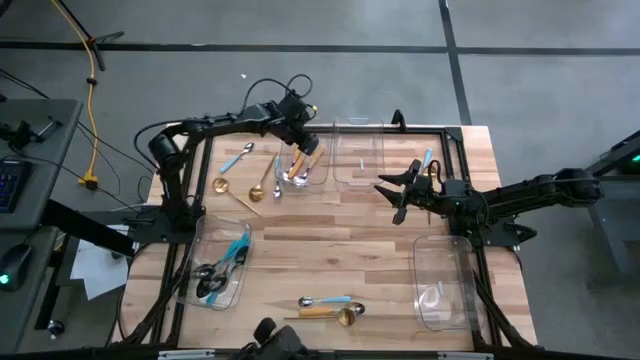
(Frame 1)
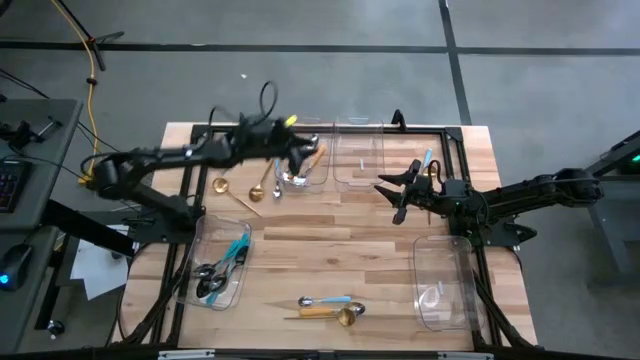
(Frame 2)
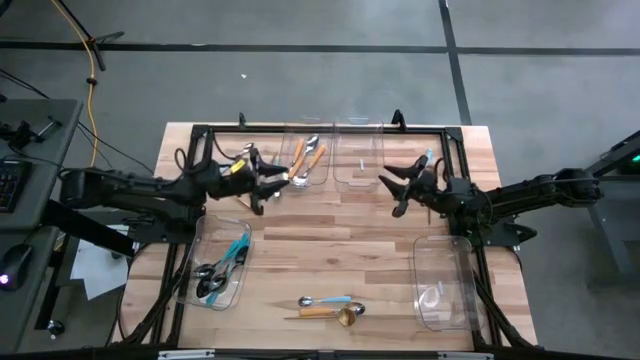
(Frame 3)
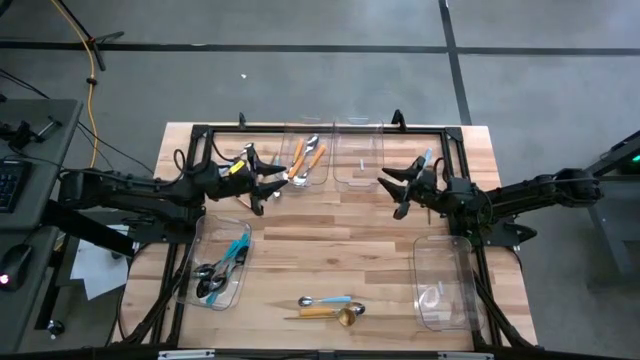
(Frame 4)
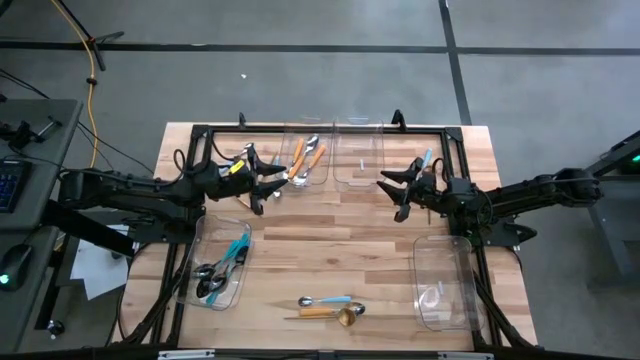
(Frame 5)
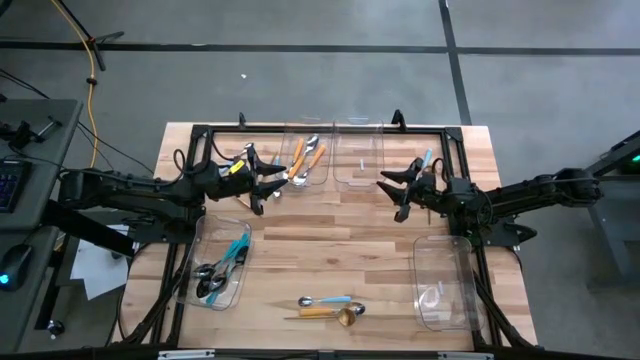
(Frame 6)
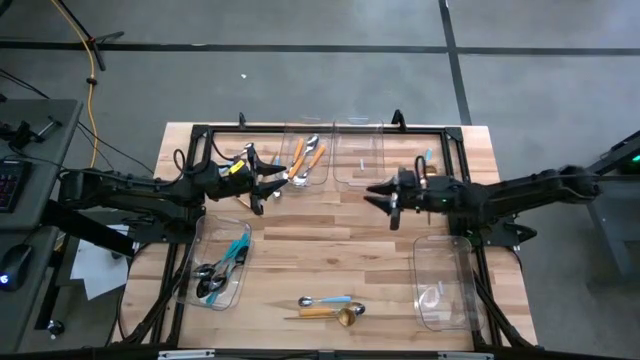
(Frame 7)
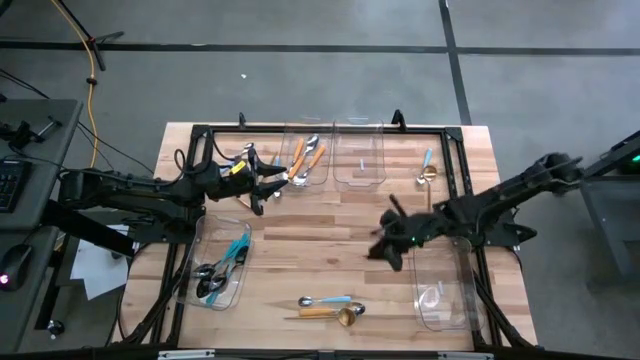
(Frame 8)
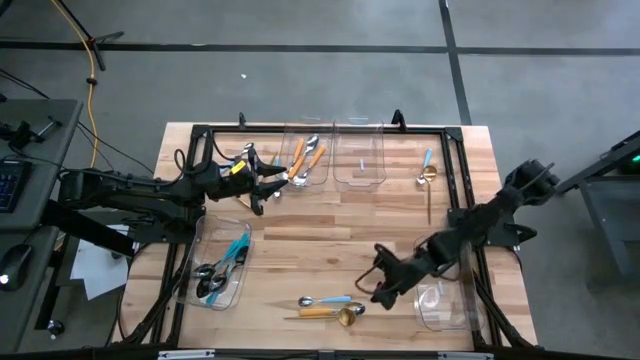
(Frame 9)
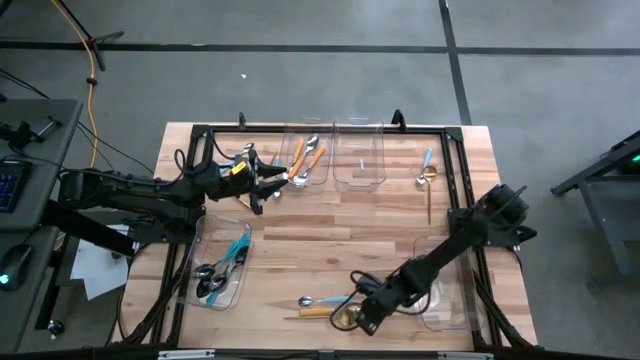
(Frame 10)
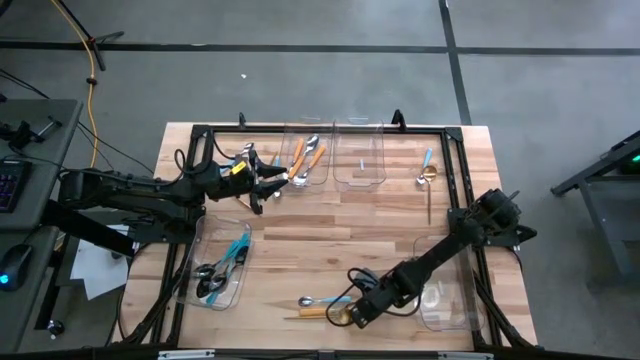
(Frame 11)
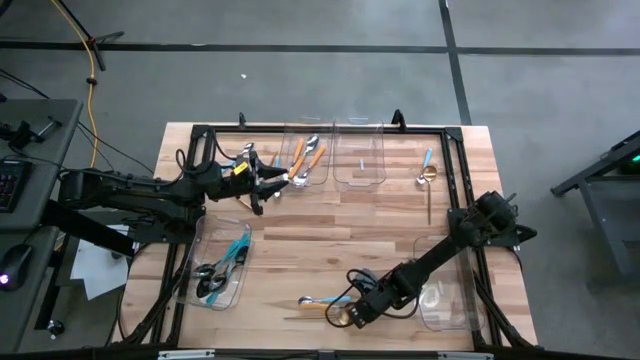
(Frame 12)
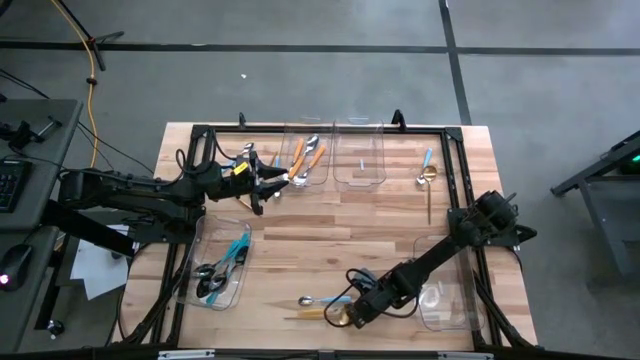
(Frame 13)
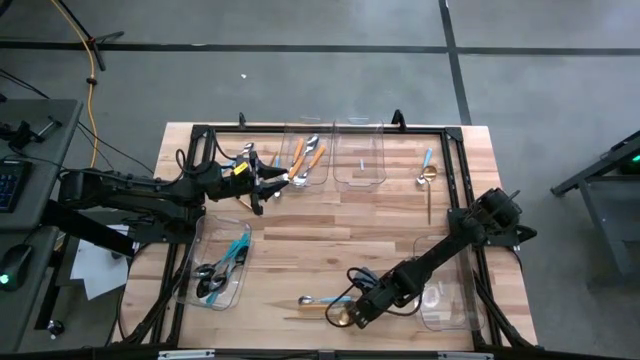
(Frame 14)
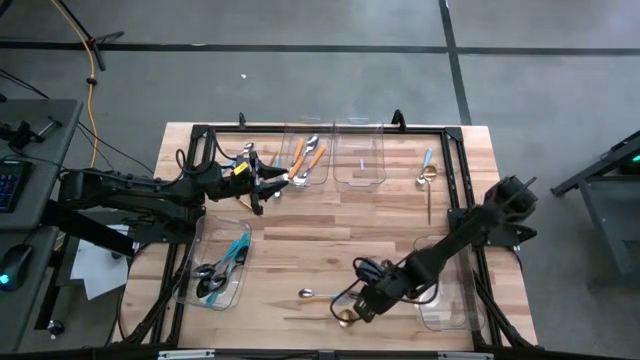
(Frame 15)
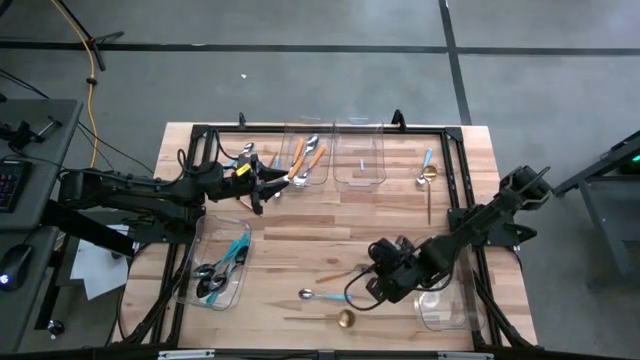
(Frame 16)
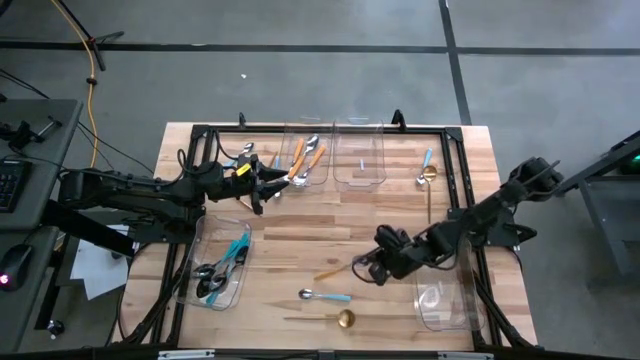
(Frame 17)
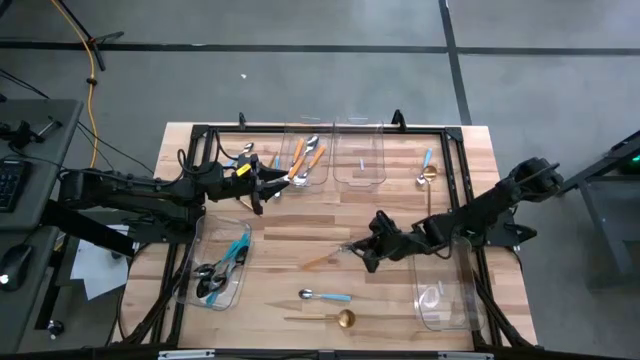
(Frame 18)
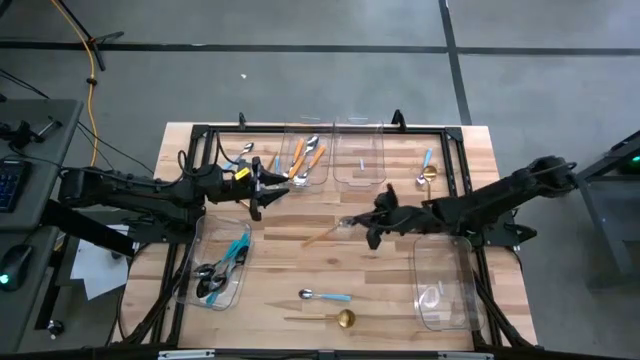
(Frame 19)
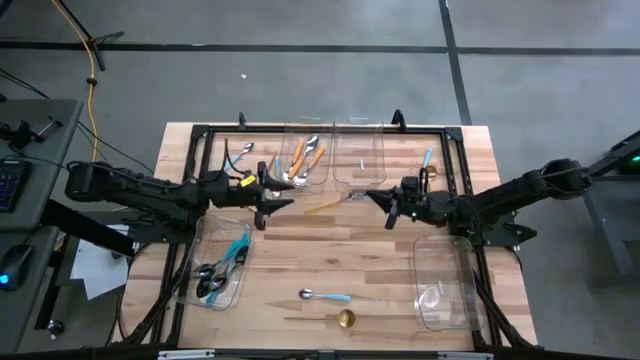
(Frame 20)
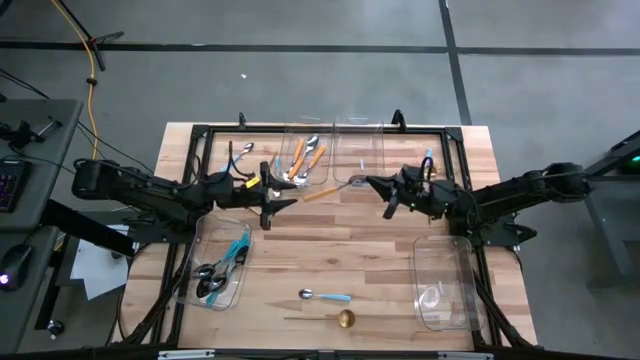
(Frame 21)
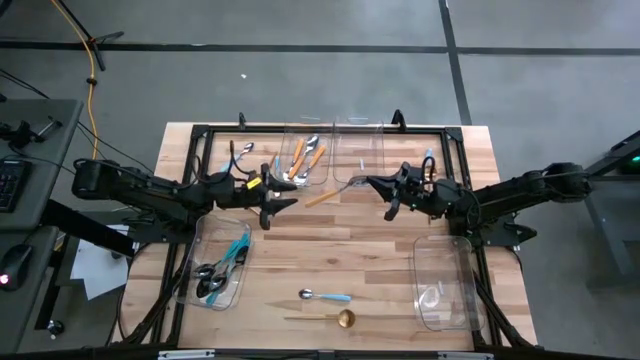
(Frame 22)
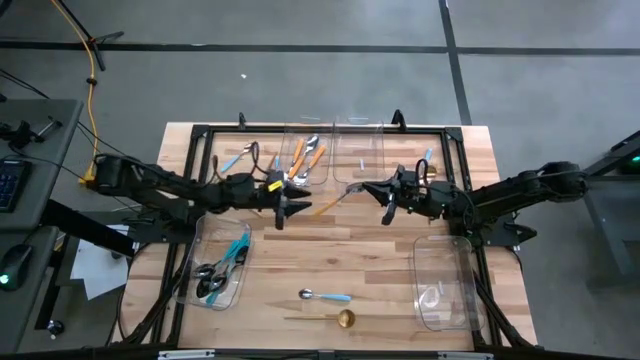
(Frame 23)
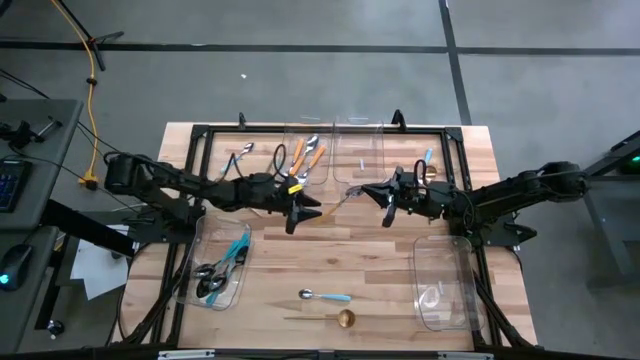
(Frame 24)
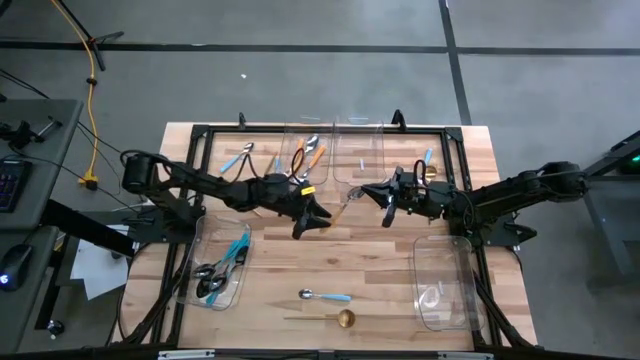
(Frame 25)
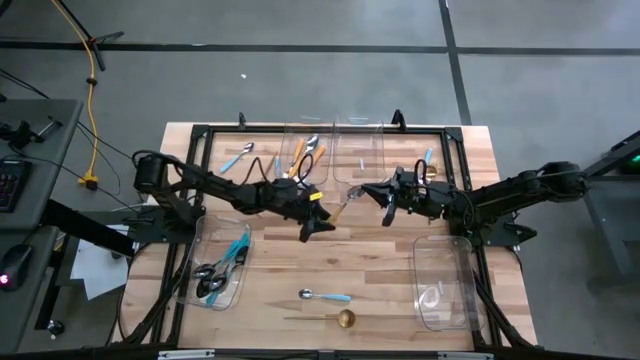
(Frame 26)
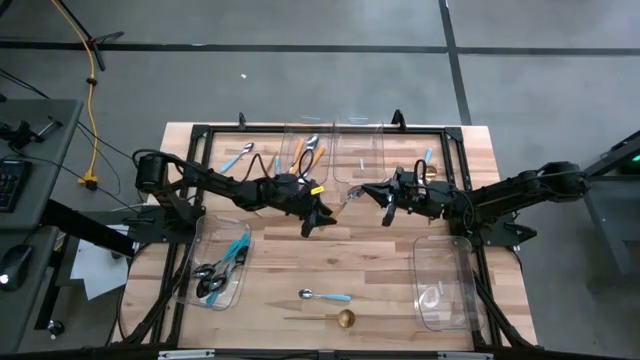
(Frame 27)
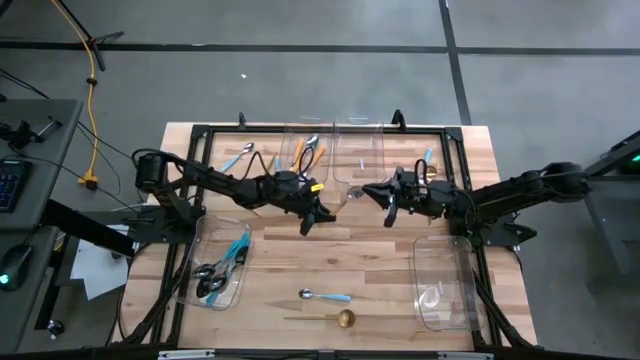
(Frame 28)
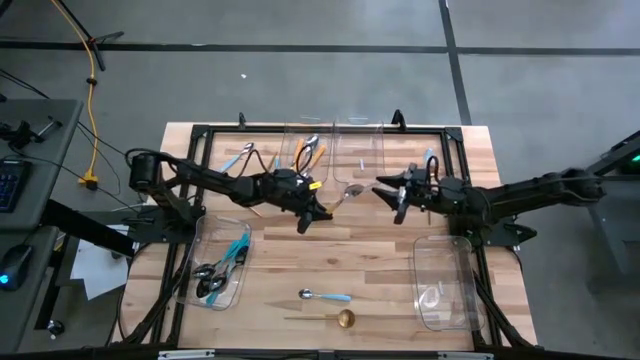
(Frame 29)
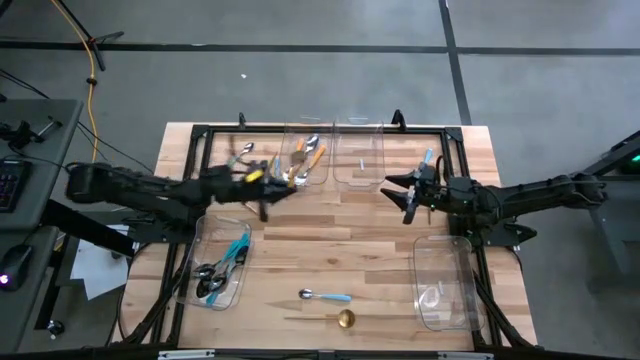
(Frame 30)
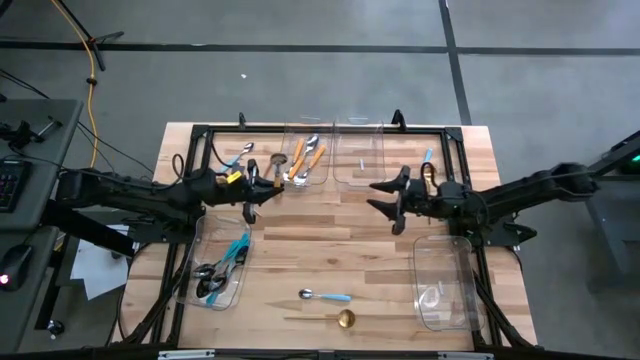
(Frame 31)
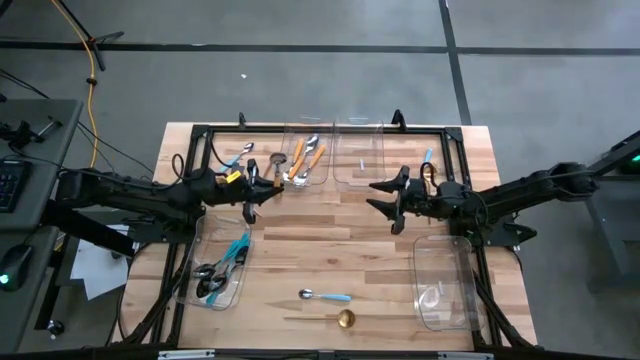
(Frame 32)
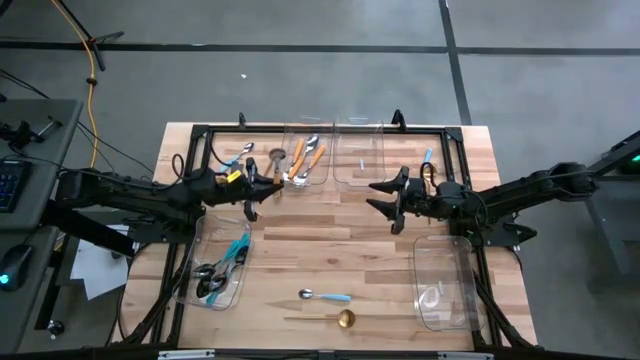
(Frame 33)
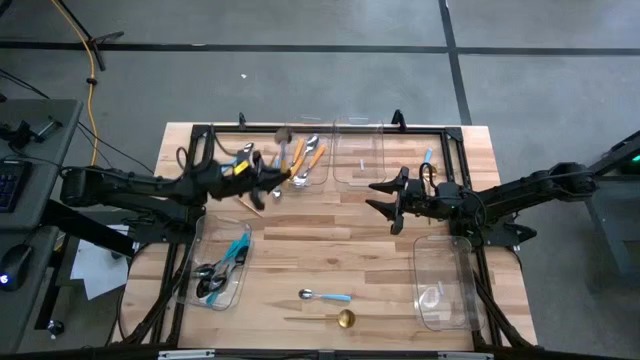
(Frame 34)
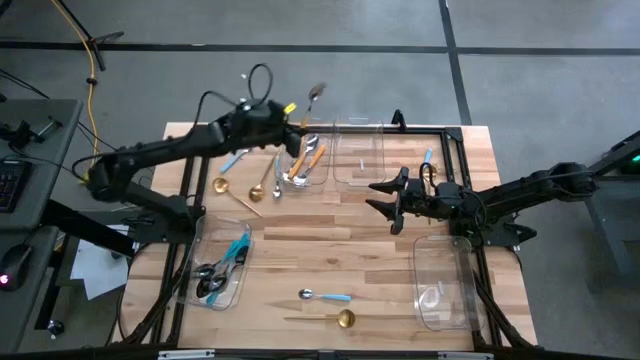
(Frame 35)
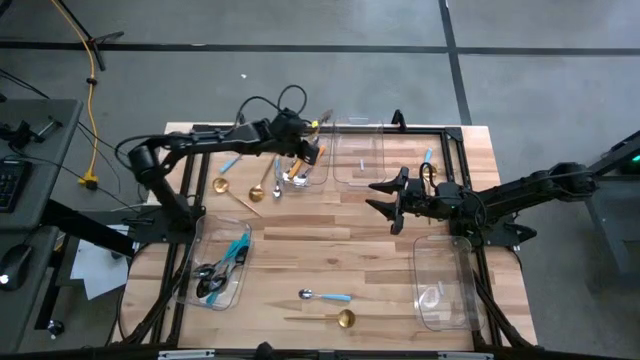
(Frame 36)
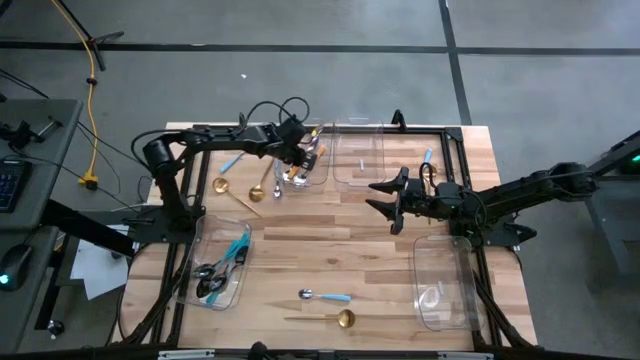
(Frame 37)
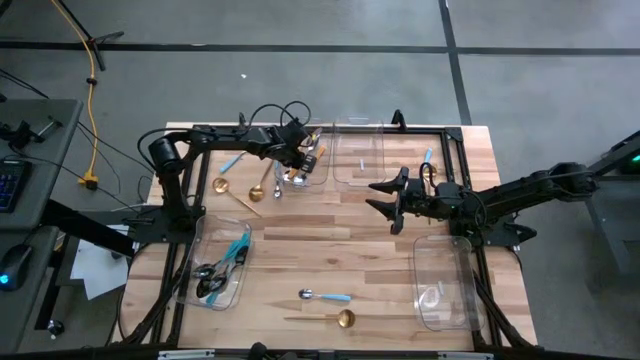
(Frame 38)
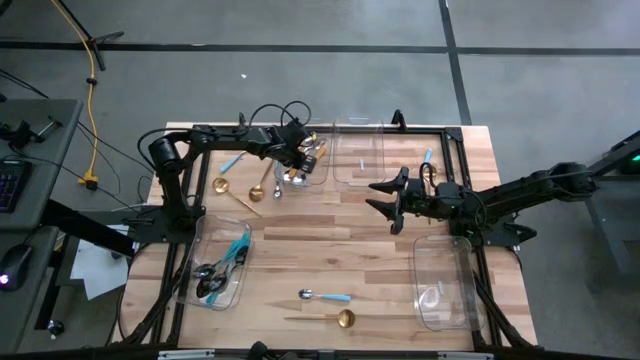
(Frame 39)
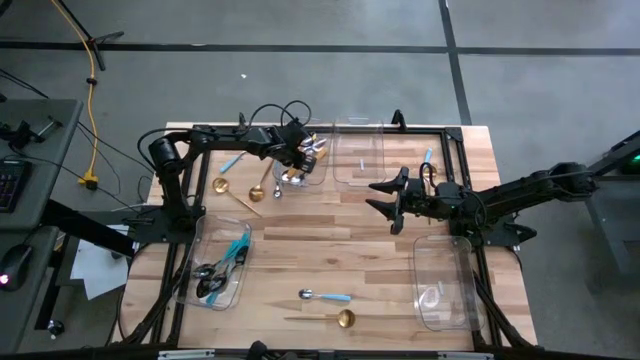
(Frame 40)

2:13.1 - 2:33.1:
Task: Sort silverware by color (type)
Put the yellow spoon into the top left transparent bin
